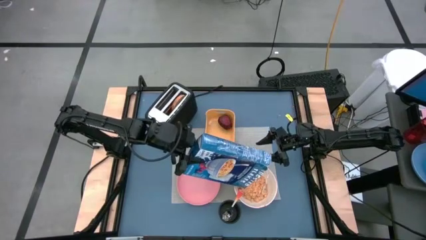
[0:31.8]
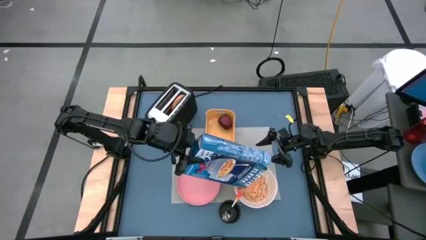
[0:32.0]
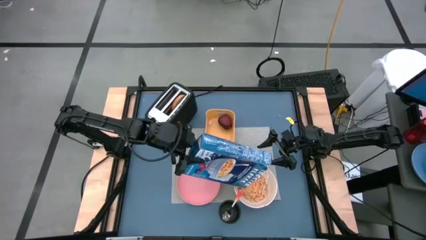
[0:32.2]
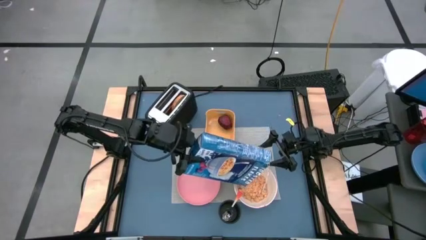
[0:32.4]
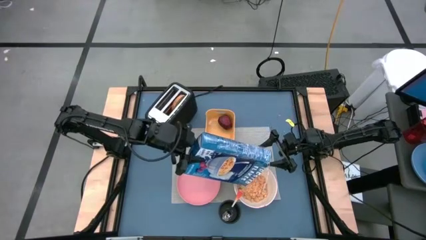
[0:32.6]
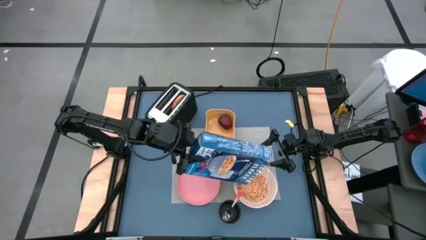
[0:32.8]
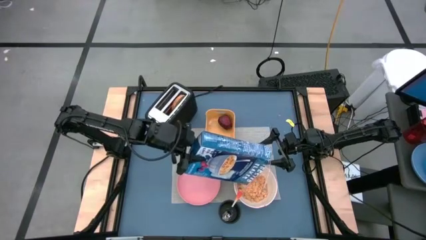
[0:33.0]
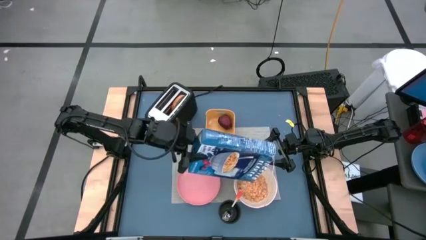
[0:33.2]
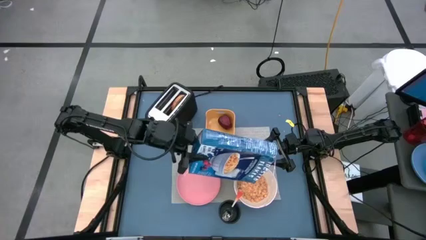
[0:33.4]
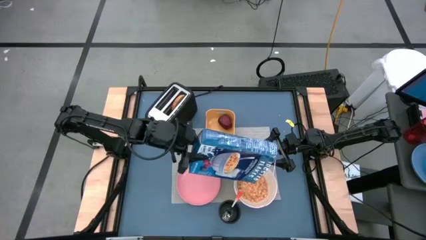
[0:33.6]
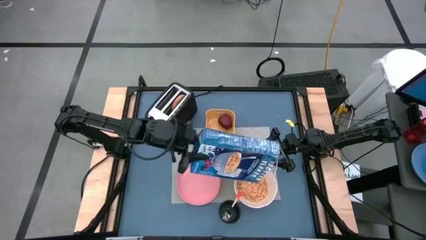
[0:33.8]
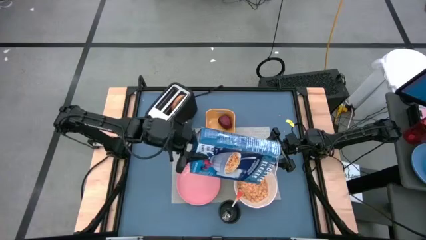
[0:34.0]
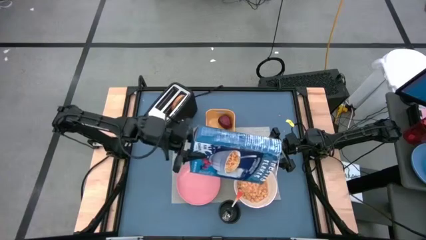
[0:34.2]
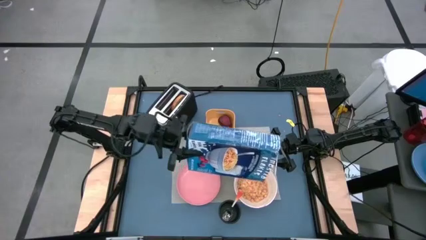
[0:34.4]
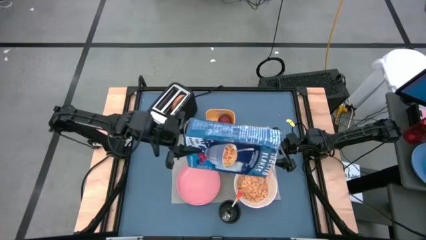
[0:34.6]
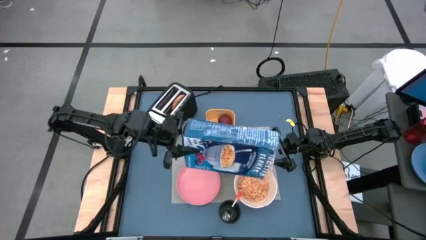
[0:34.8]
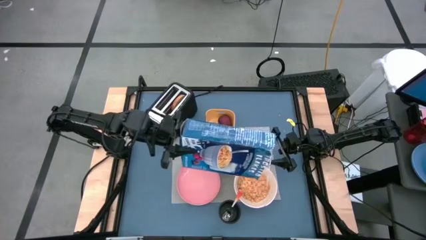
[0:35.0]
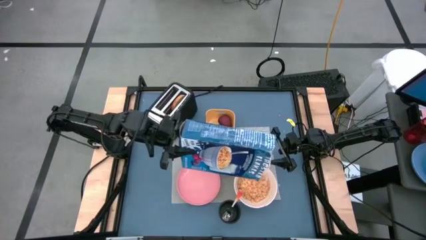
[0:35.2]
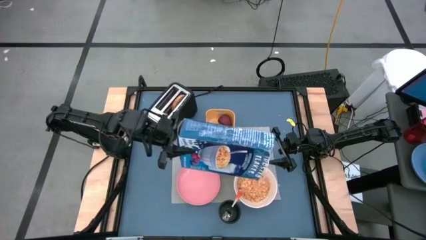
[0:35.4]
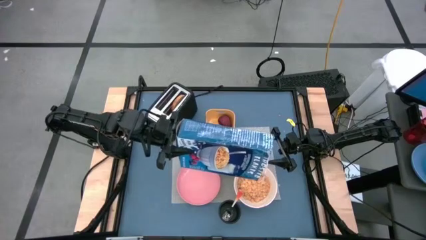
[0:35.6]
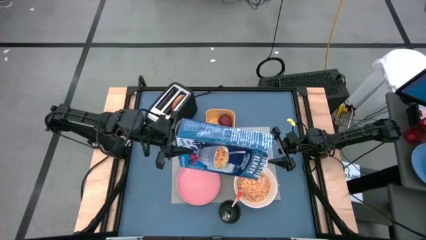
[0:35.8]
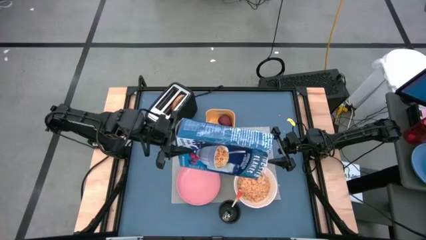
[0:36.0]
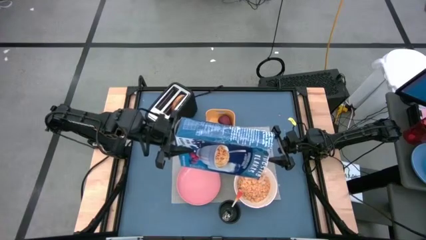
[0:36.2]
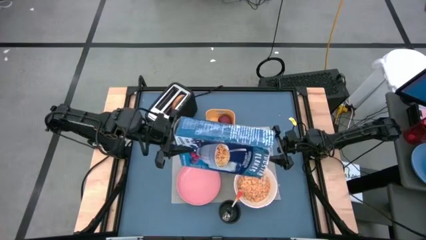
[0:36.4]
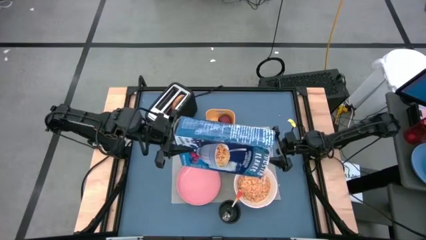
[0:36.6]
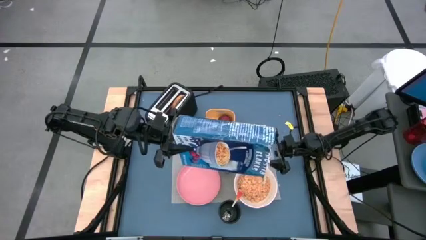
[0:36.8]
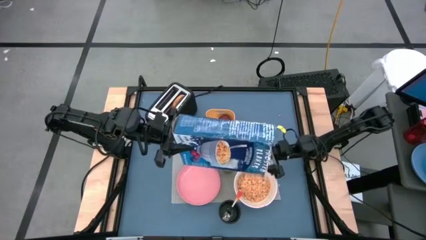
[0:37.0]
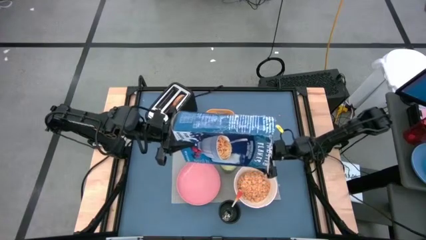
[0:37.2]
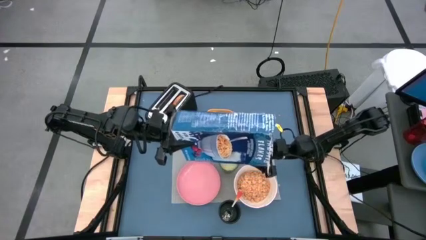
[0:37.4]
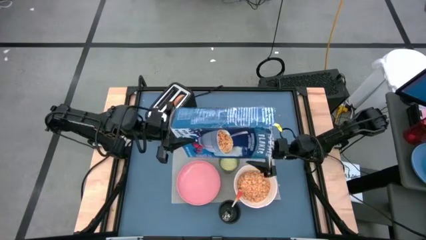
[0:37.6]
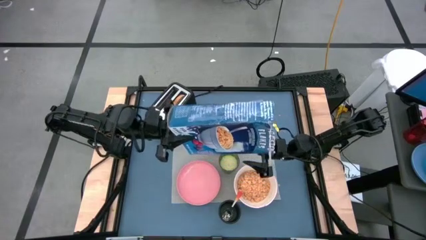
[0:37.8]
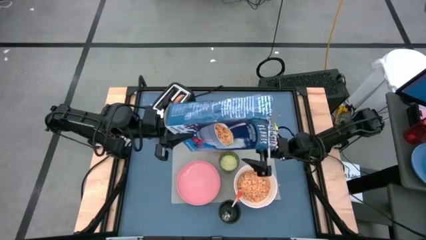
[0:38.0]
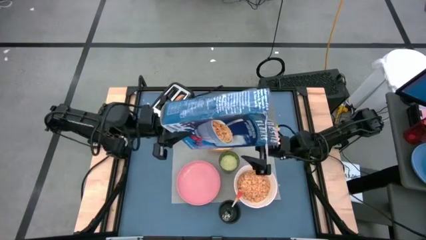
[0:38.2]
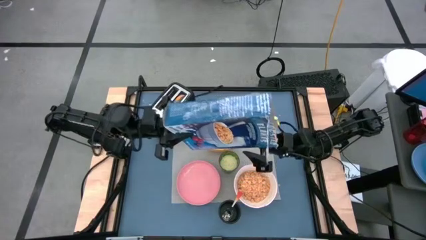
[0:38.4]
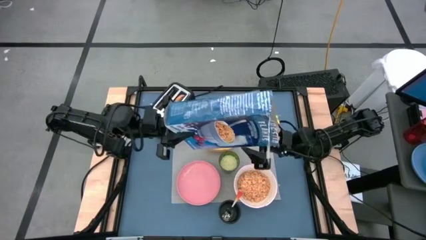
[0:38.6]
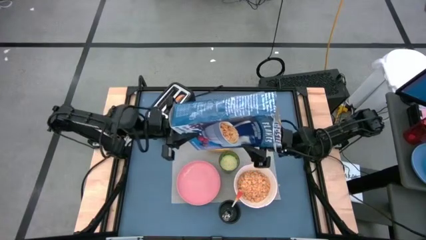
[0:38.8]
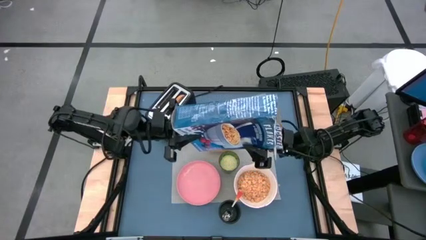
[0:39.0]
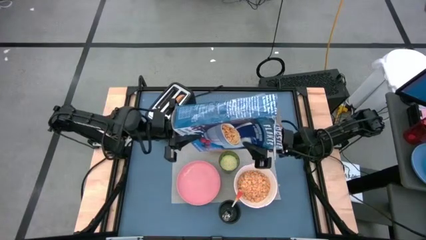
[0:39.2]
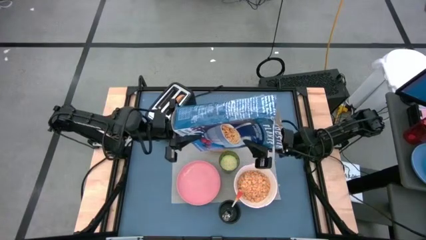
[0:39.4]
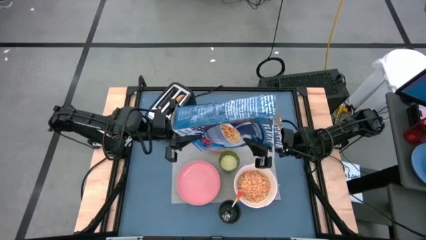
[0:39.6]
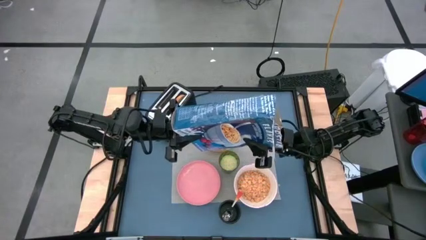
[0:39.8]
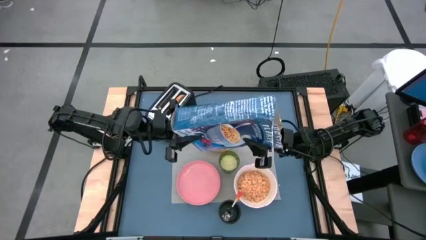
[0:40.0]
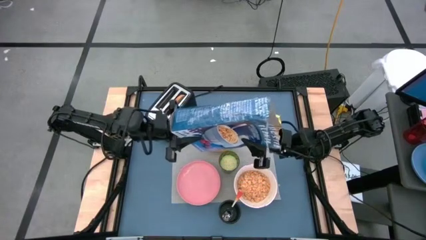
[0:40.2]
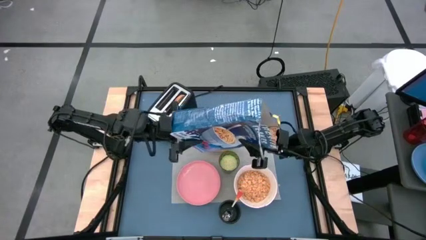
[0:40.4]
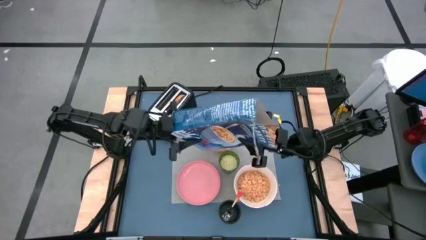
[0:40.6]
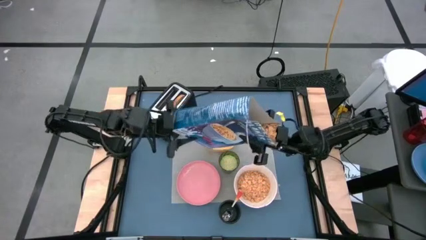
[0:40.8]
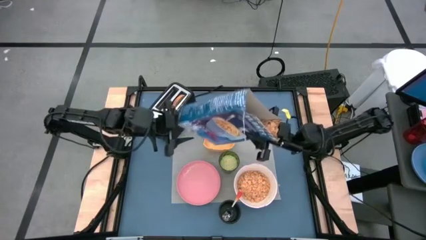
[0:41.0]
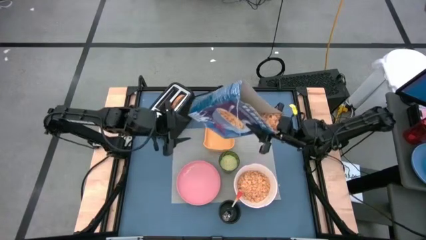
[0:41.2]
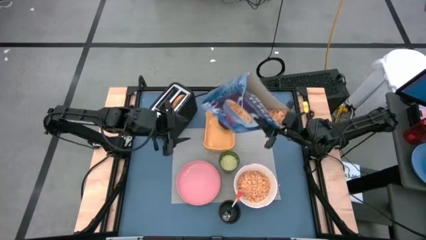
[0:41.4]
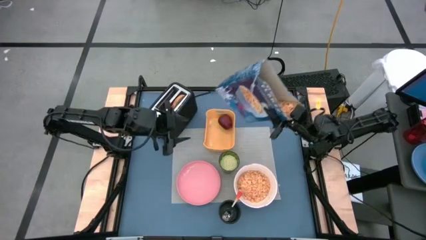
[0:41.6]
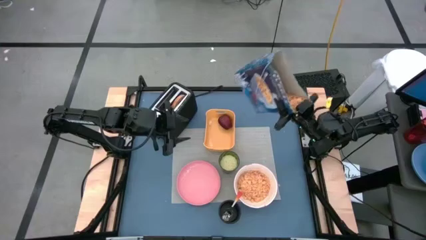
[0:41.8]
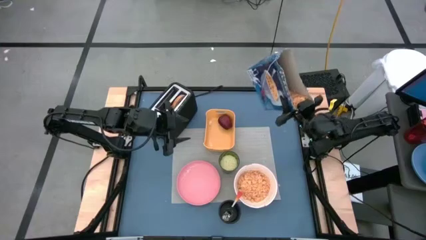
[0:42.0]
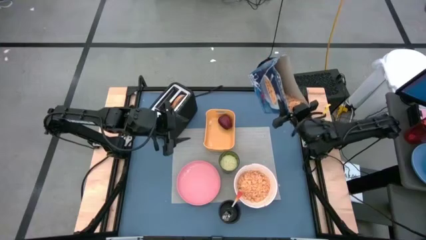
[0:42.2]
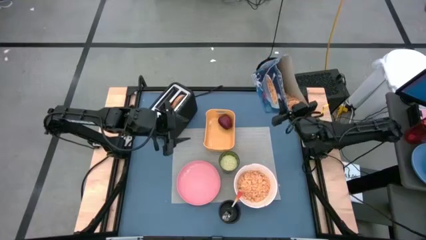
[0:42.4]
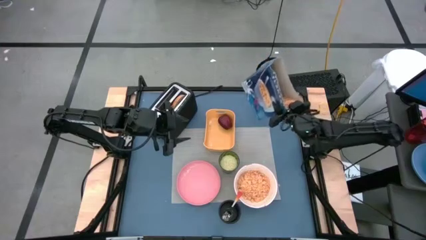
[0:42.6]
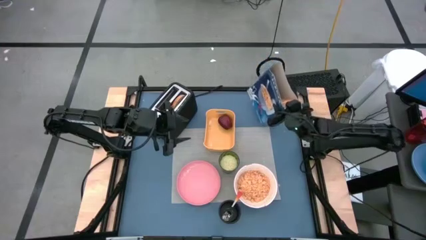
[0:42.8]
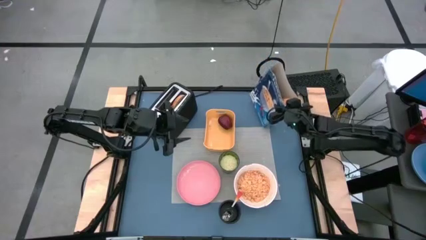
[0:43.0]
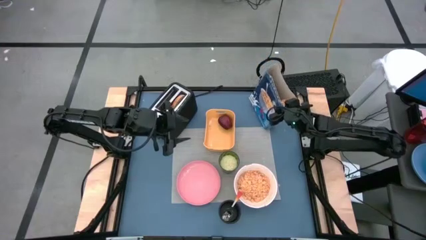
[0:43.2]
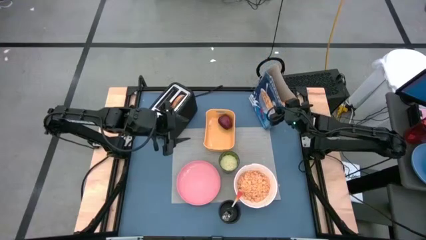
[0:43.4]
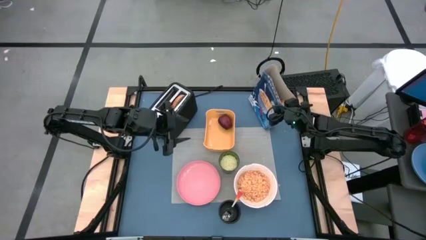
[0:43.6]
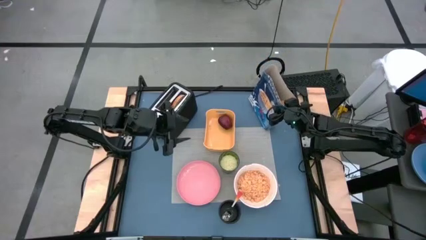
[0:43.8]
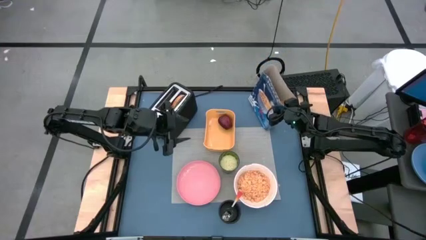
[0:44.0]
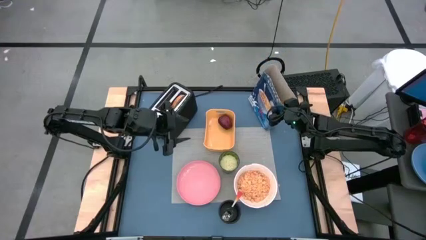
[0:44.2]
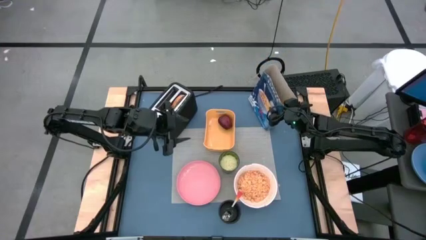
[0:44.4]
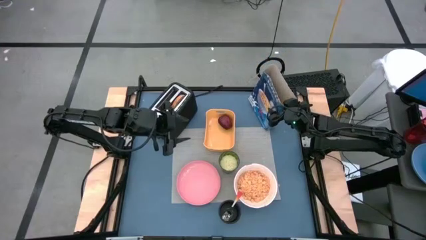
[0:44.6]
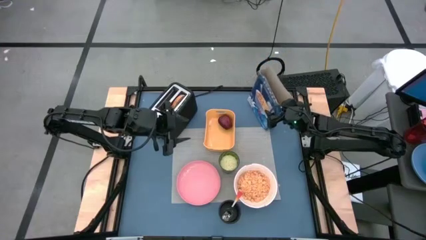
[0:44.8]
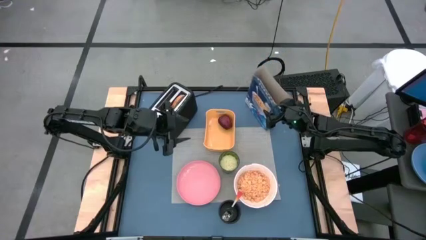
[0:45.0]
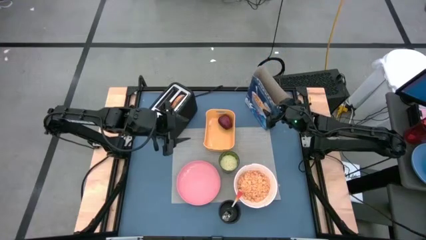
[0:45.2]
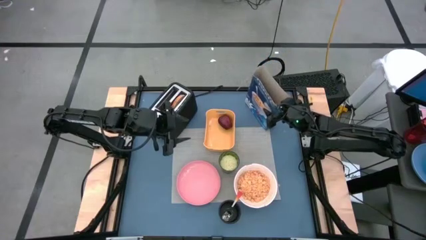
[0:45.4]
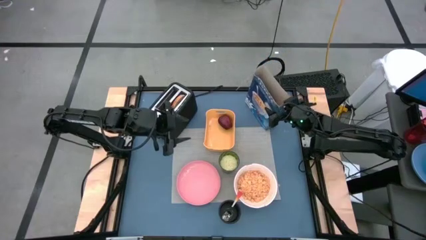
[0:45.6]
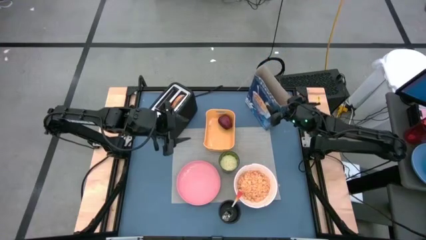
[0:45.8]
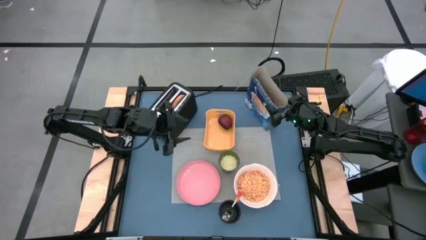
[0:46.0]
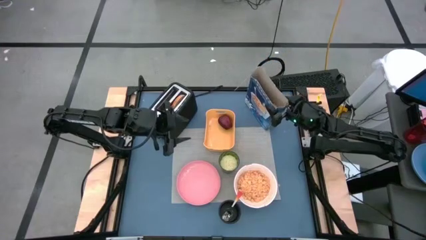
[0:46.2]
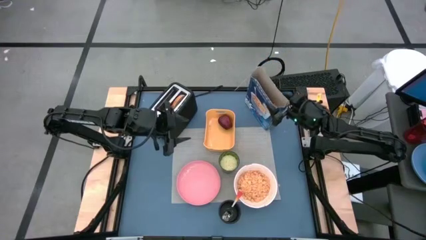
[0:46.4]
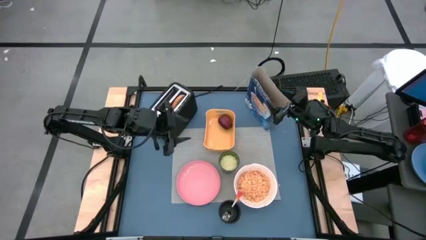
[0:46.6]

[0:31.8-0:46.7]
Task: Arrange a breakfast setting
Pour the cereals into the white bowl
